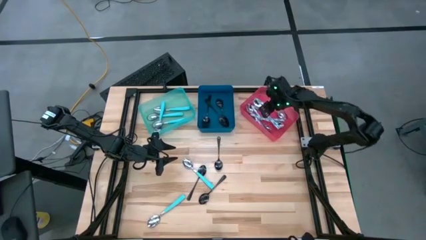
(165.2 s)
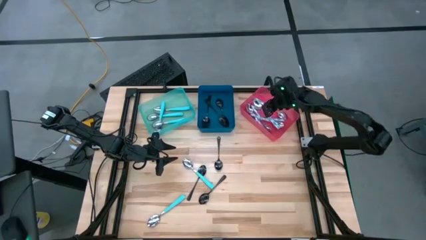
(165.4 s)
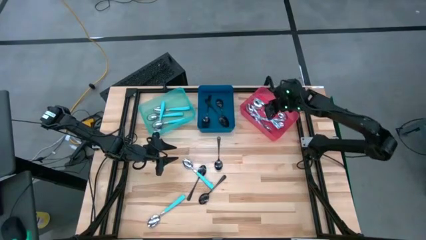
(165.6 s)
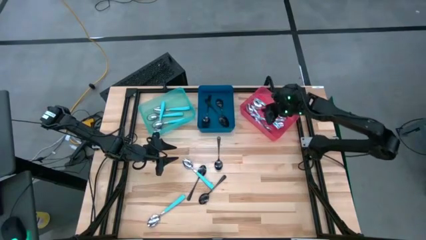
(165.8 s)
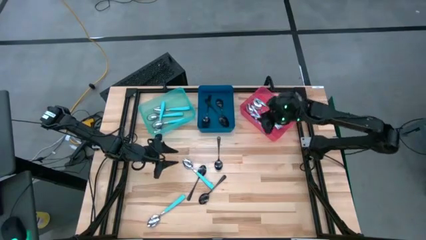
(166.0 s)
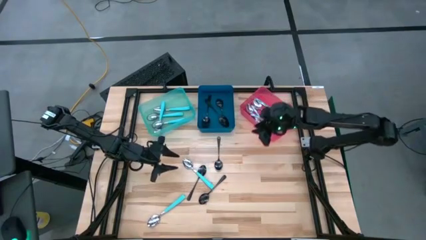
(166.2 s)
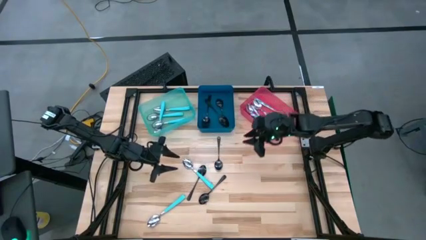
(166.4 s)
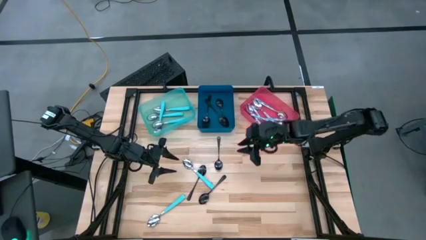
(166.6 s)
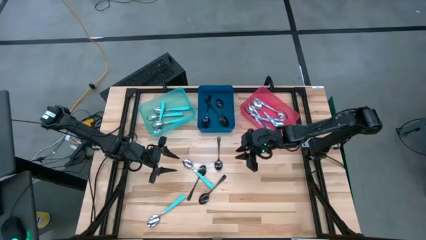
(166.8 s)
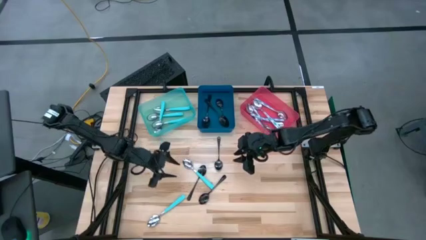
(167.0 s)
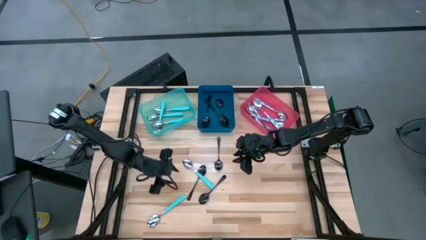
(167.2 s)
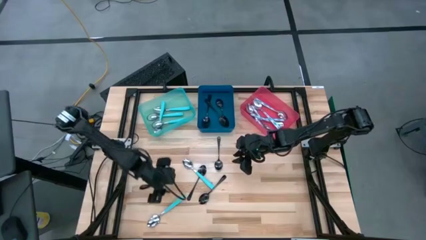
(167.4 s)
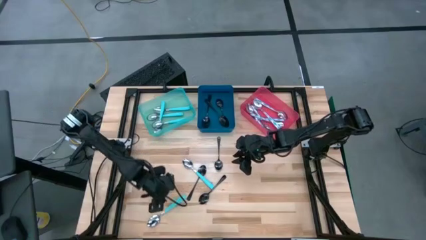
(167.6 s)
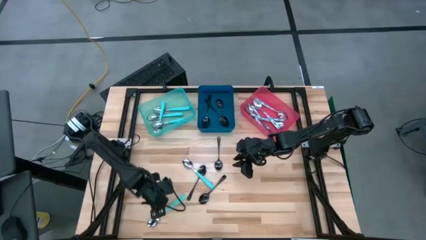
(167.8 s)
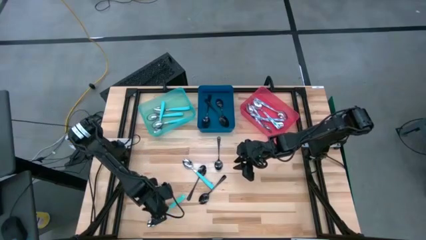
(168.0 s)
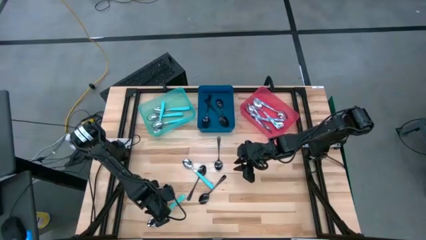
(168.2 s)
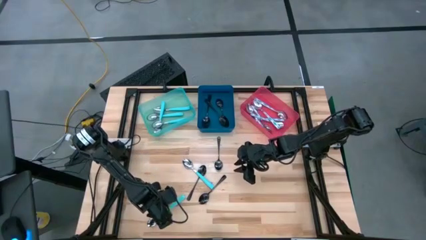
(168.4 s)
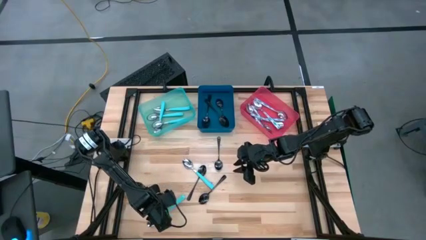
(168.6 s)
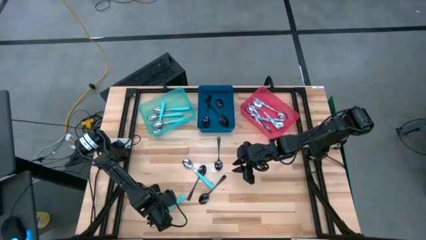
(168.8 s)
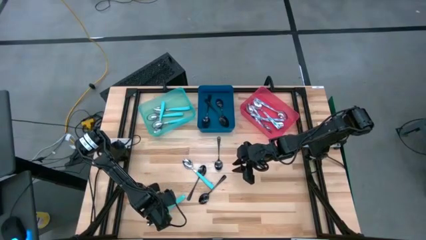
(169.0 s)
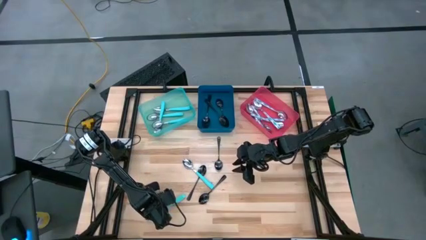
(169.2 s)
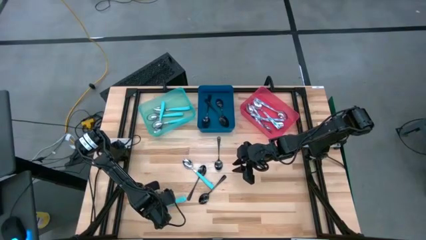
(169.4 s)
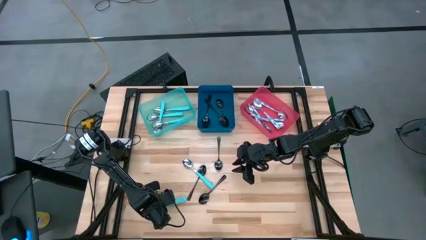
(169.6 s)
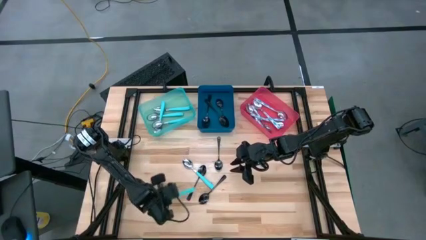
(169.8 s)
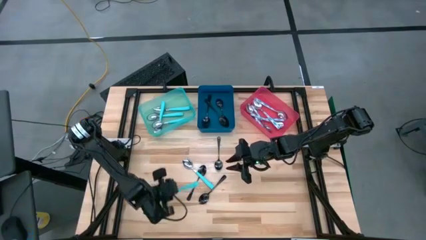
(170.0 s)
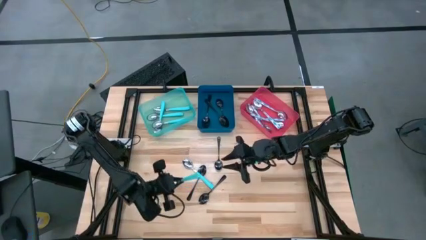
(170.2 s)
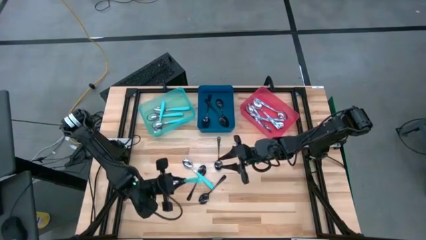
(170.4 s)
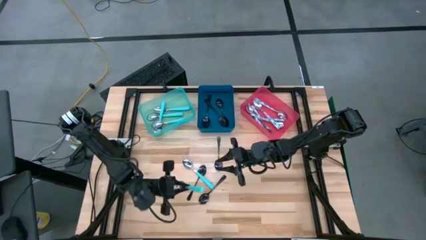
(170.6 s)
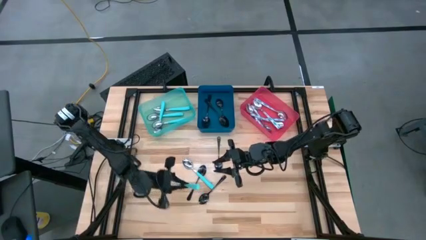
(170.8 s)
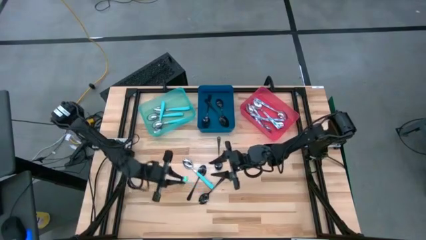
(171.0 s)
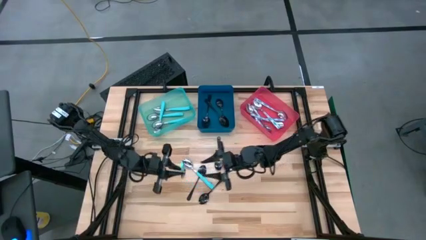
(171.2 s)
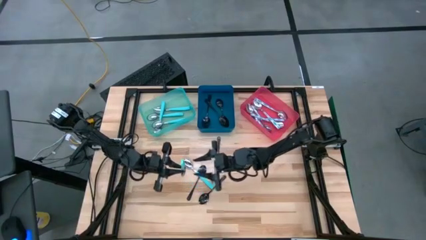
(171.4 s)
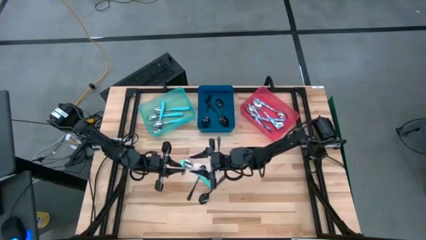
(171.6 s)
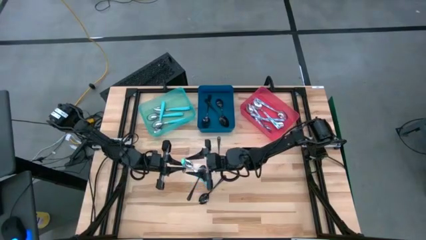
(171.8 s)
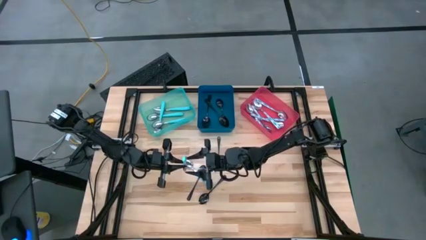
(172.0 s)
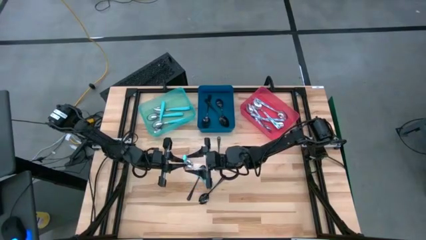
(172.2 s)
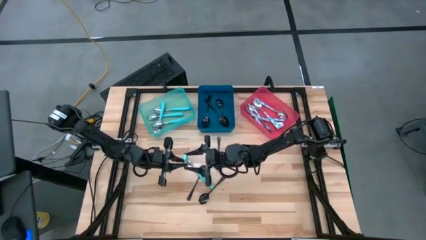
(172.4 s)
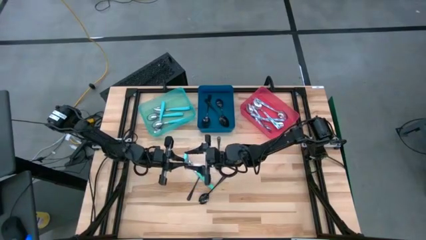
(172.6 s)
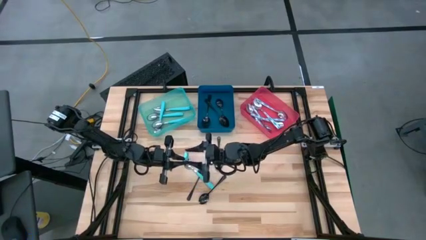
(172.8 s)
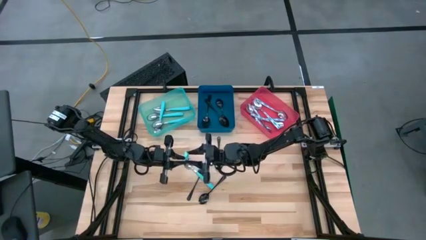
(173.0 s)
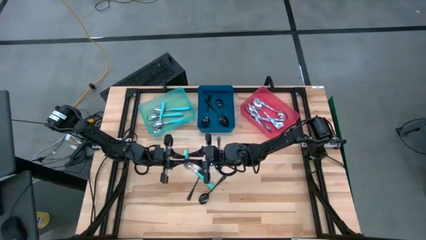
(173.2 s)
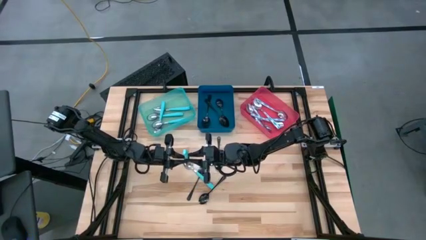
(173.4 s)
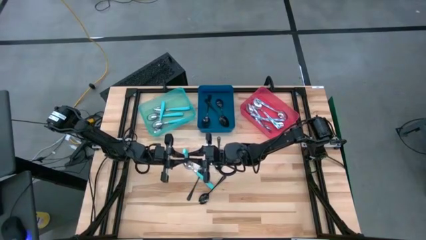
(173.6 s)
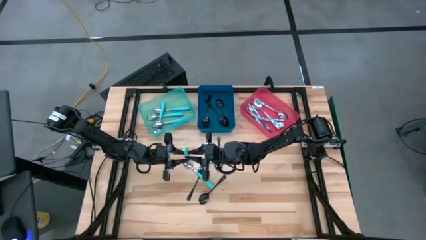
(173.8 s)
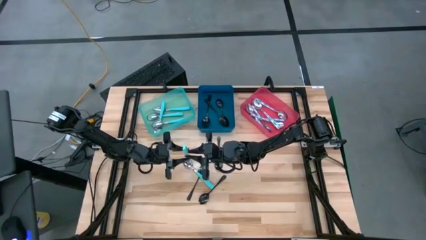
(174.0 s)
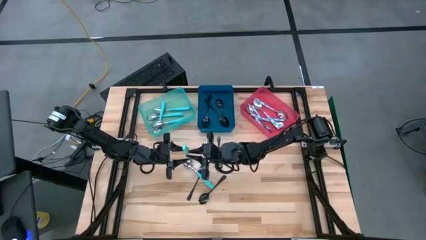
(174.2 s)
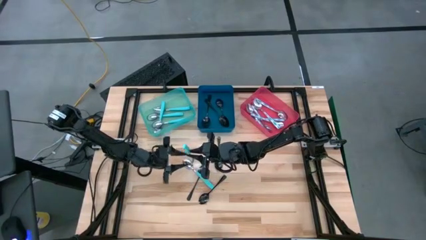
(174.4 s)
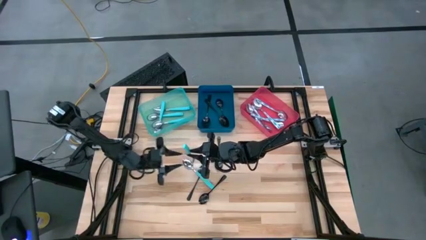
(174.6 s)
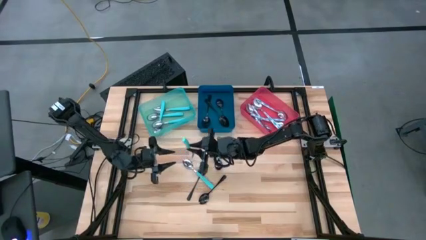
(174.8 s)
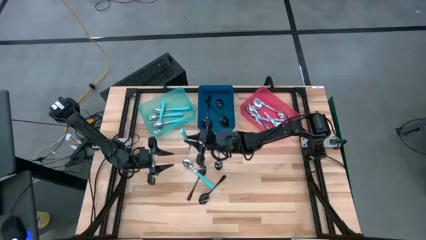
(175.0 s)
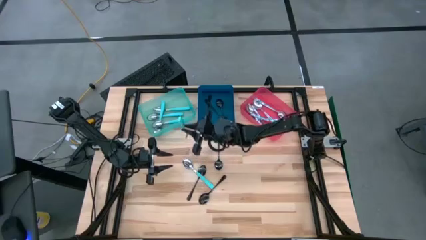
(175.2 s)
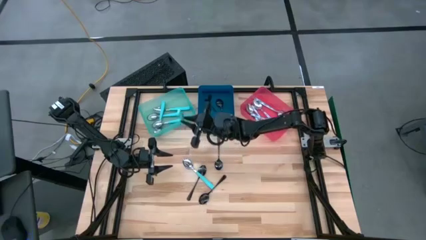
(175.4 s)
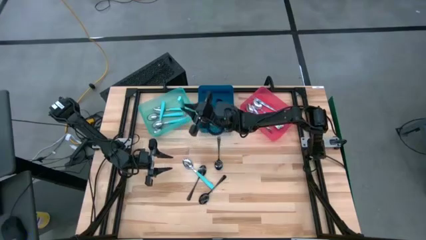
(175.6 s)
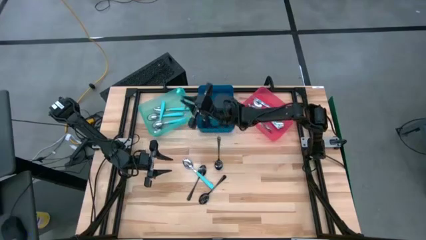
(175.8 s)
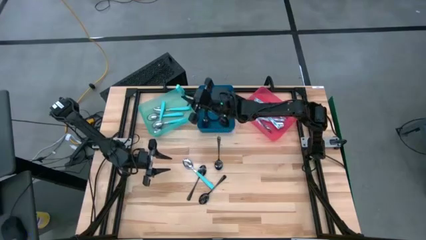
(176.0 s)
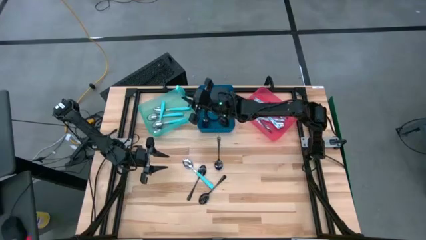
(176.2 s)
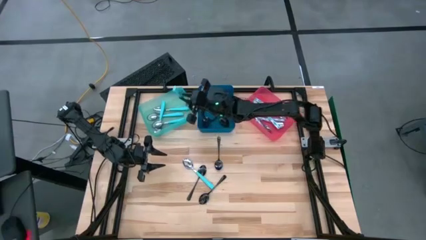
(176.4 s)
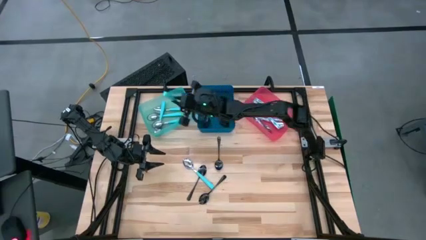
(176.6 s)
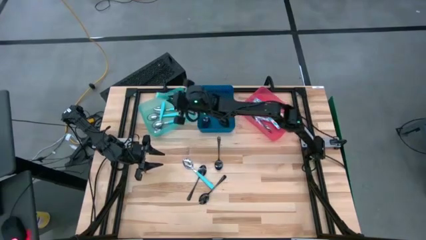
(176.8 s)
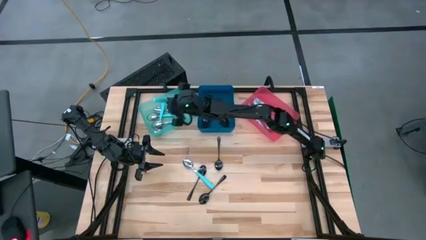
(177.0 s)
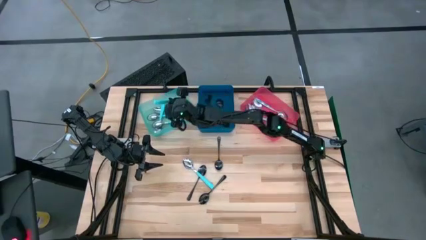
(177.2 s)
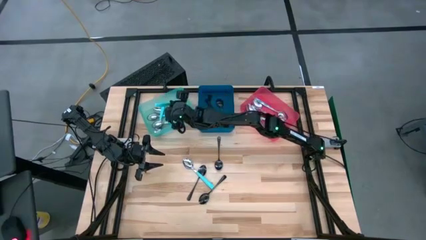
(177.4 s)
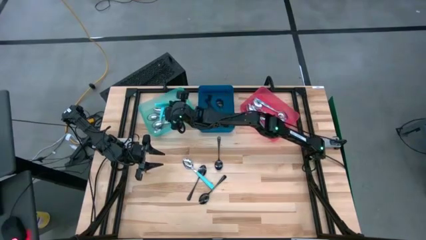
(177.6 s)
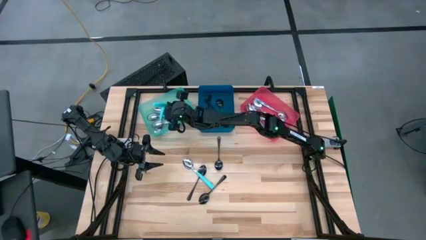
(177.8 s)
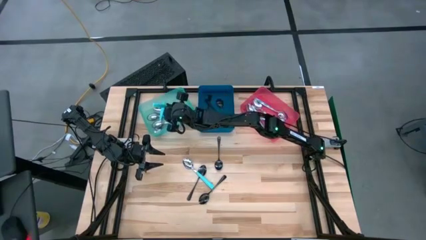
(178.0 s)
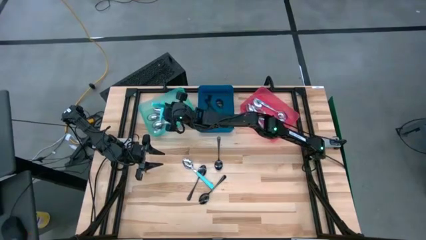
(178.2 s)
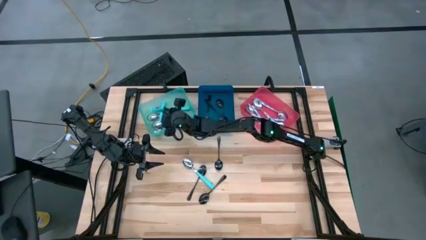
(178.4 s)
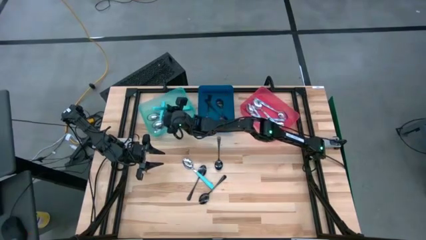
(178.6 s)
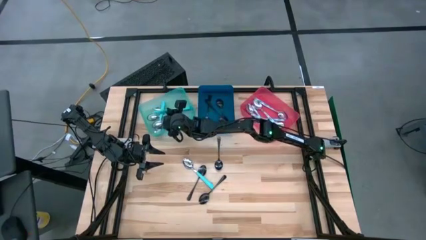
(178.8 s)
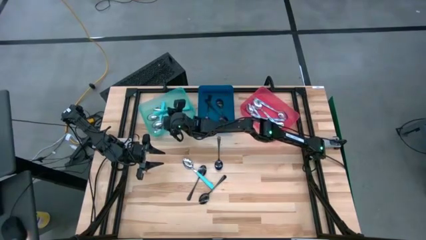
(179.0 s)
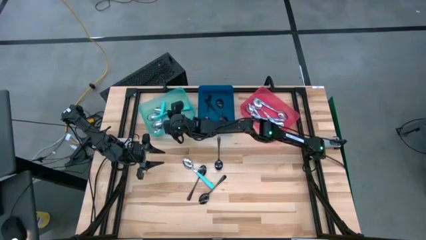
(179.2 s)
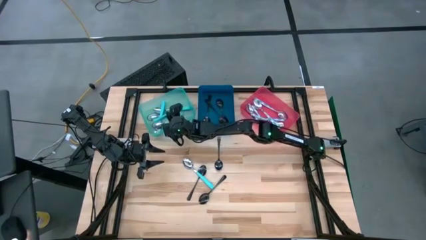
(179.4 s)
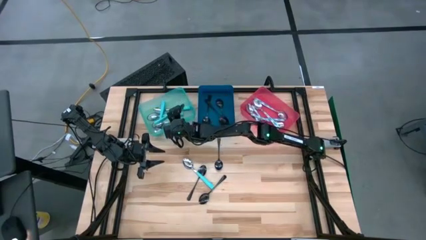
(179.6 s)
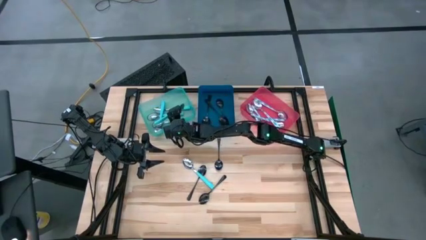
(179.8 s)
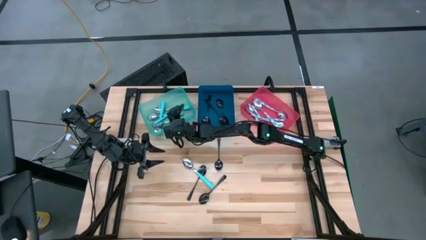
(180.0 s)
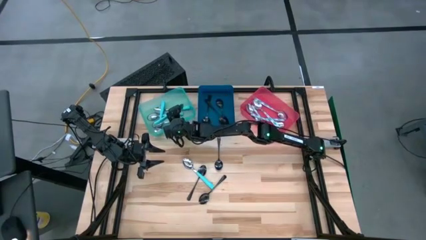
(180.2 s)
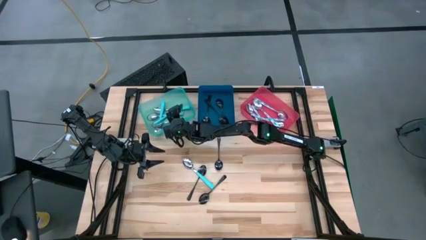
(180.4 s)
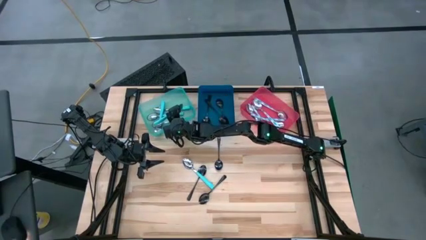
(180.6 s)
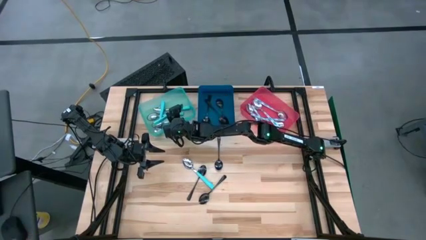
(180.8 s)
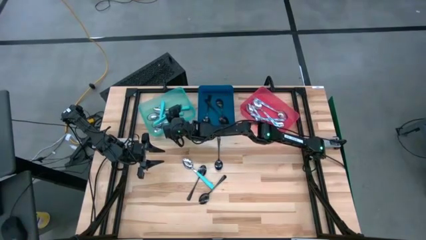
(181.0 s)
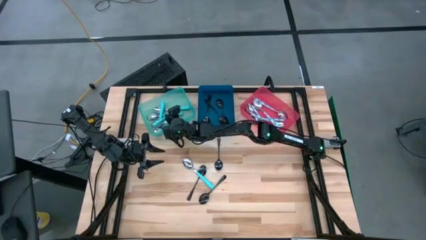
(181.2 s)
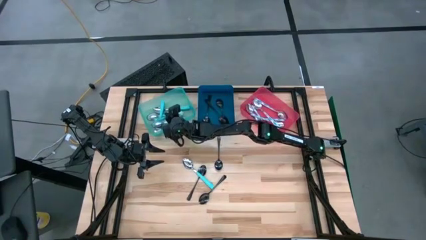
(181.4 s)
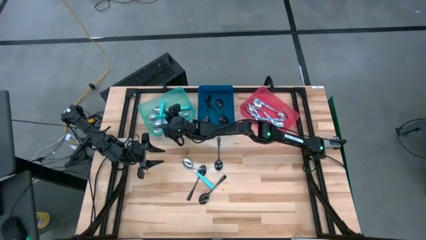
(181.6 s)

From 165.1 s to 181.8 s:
Task: Sort silverware by color (type)
Put the blue spoon into the light blue bin
